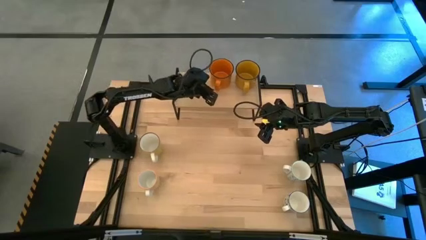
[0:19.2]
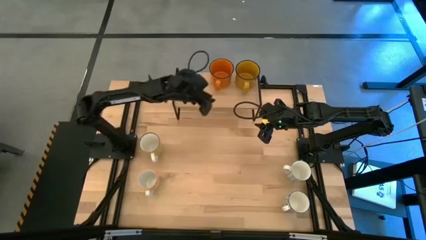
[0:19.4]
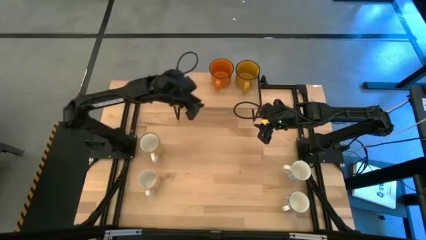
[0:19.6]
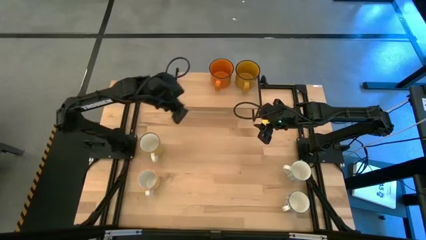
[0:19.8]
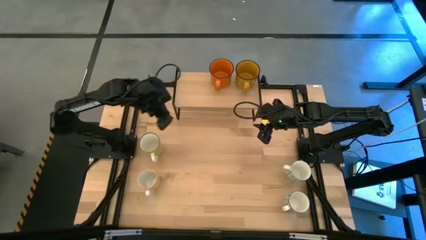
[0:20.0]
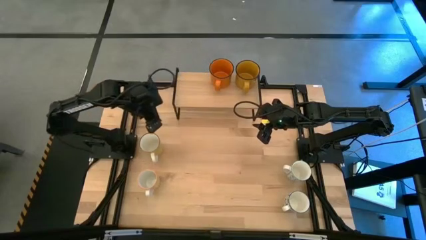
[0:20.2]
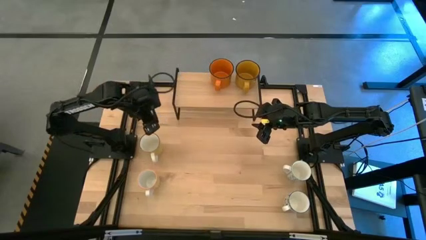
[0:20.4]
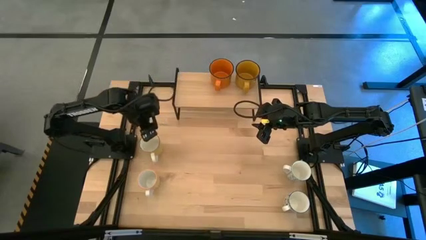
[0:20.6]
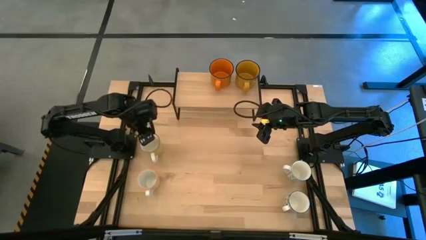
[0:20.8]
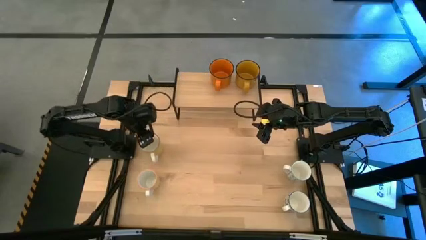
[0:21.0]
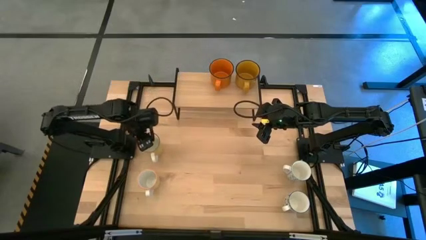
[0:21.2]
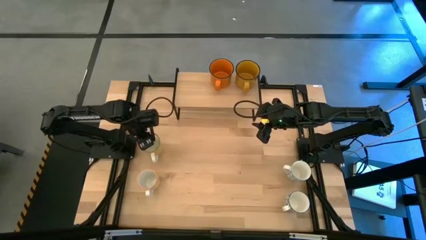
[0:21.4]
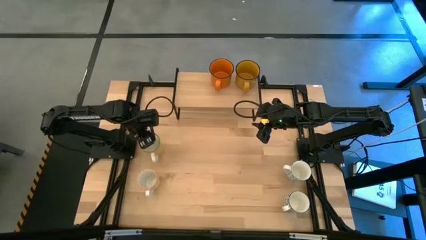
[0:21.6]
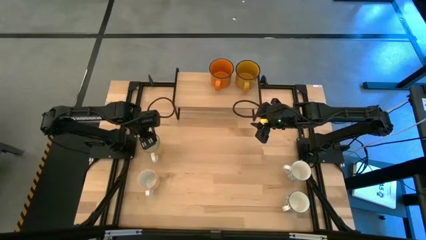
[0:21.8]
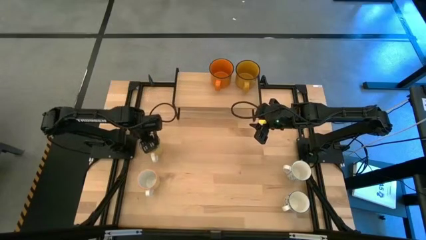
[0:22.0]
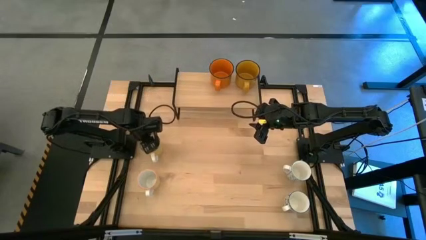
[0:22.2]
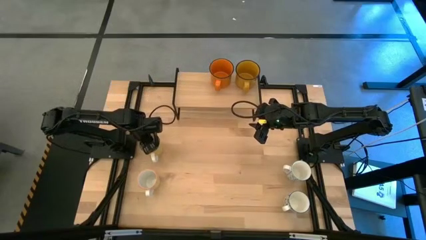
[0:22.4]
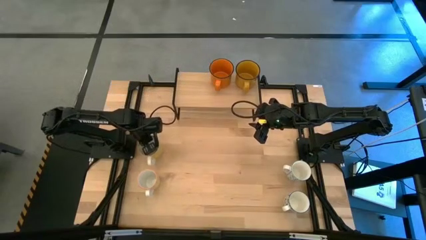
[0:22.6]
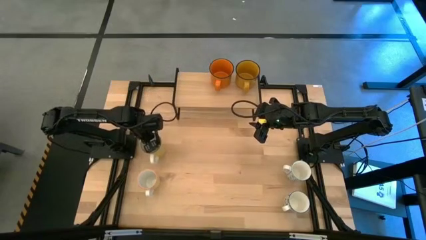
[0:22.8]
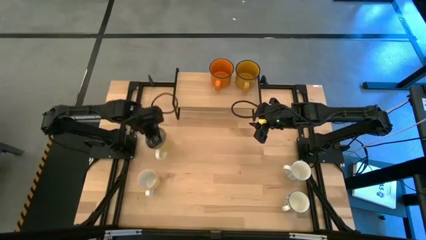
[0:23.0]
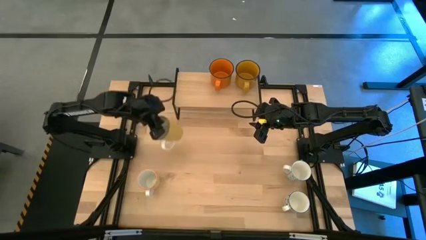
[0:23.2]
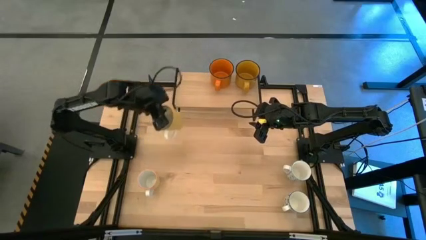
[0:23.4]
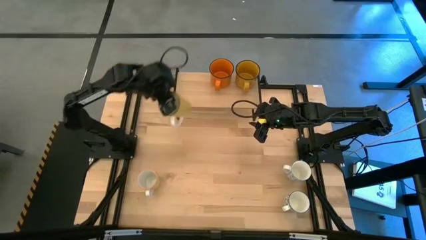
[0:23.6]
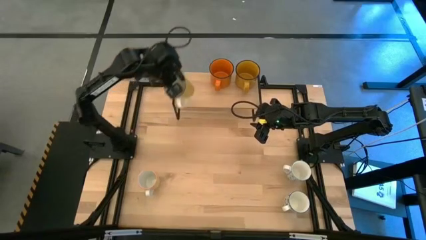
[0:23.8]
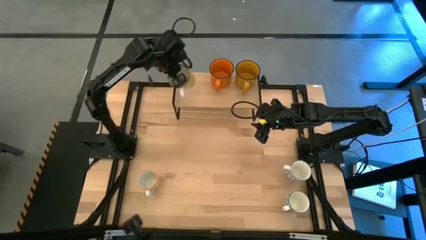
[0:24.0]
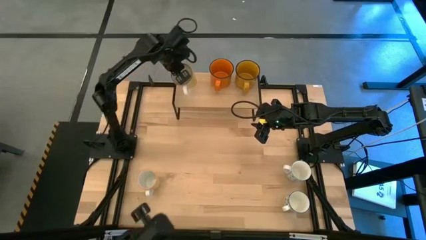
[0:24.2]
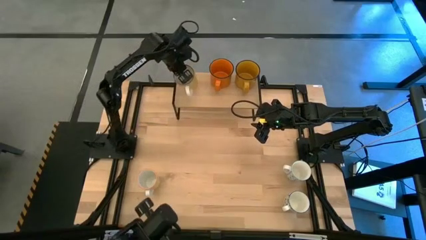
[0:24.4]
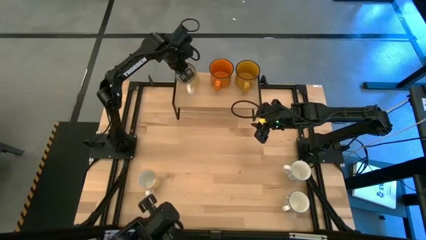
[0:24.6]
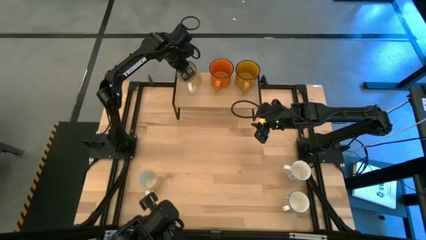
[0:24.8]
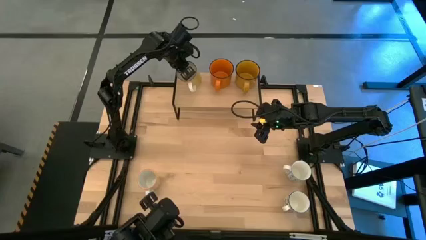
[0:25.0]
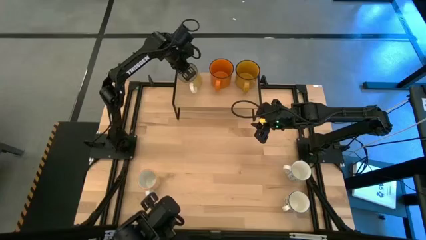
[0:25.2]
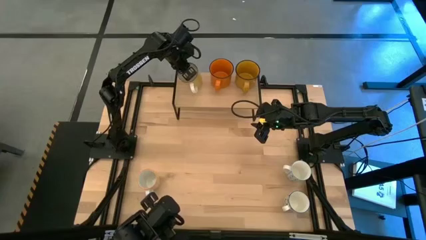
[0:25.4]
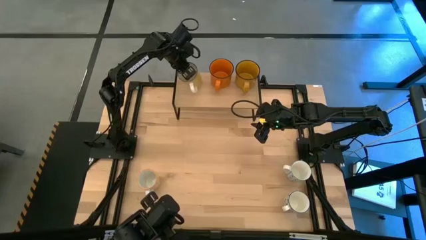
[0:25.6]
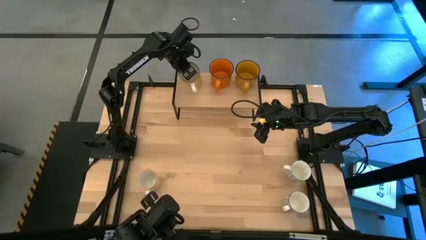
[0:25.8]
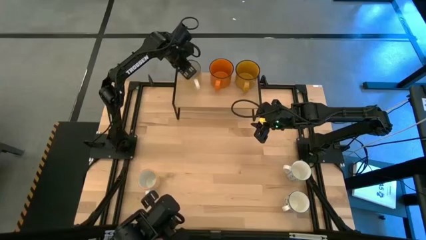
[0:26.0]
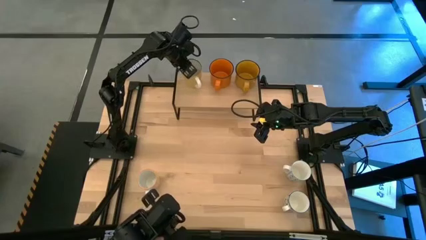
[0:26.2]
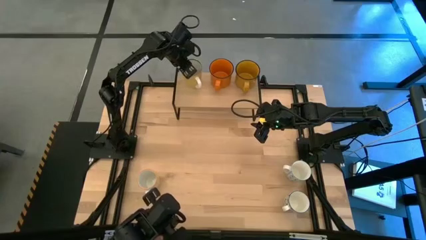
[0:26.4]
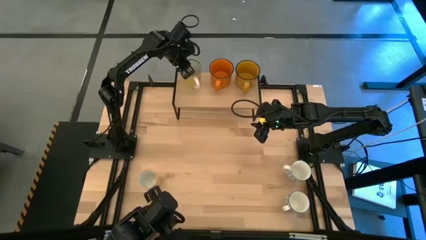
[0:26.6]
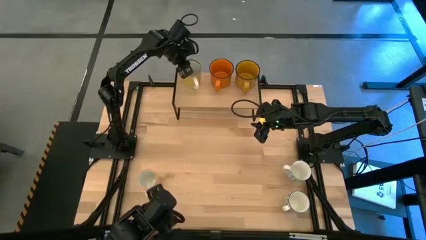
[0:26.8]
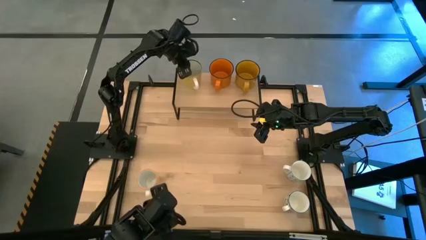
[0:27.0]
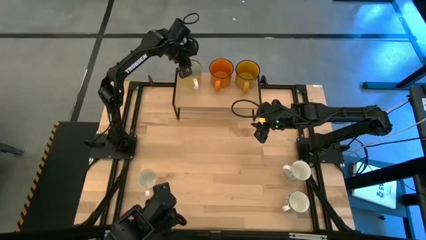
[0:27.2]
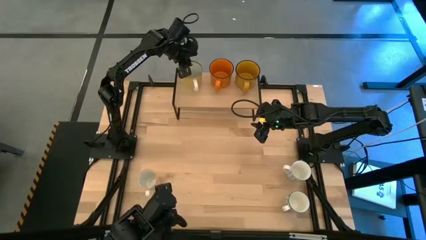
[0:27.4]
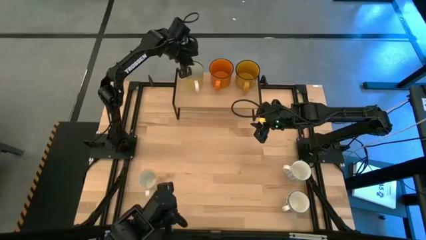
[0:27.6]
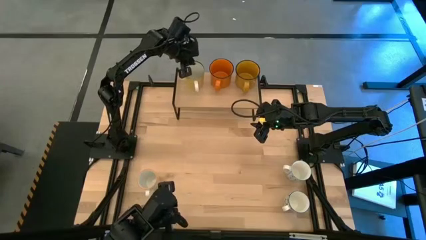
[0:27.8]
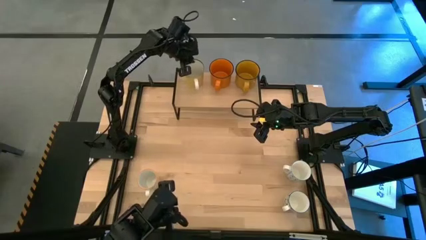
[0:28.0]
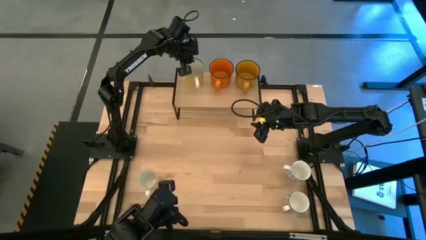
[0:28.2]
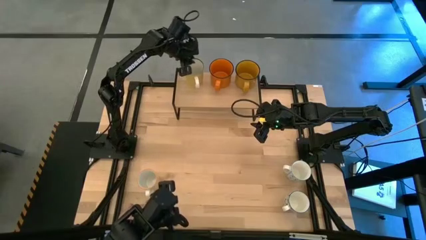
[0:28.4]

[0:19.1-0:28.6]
Task: Place coffee mugs
Put the light yellow mug on the shelf

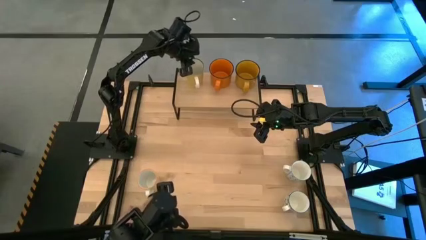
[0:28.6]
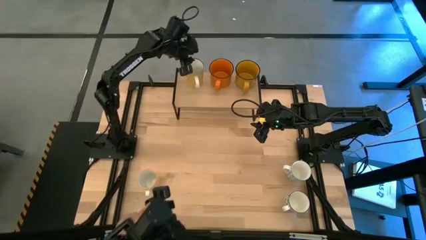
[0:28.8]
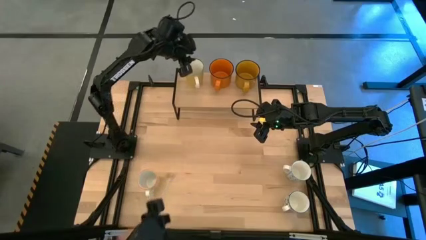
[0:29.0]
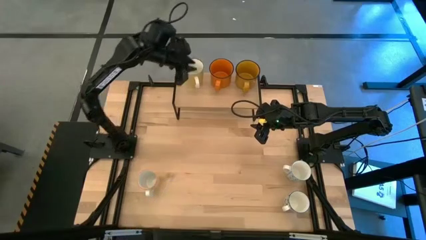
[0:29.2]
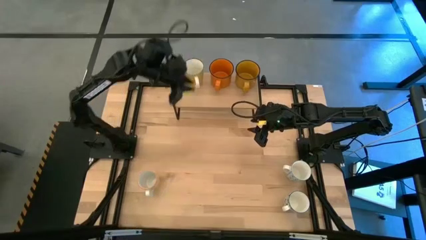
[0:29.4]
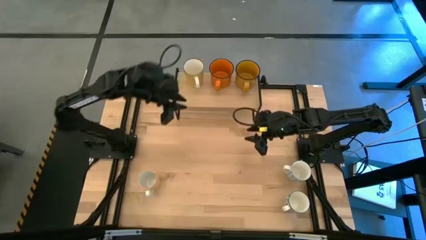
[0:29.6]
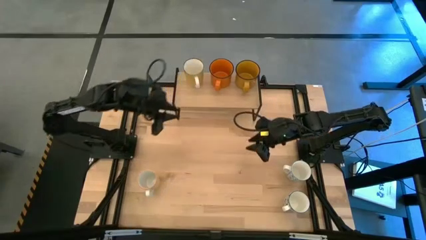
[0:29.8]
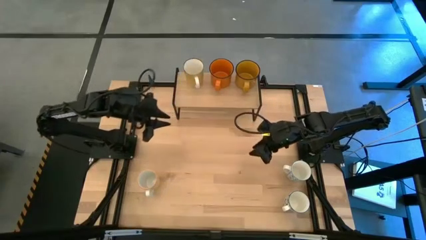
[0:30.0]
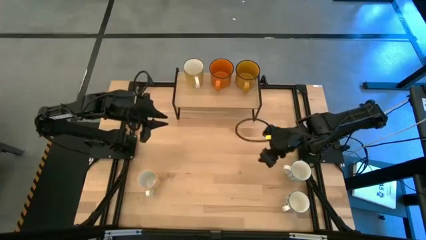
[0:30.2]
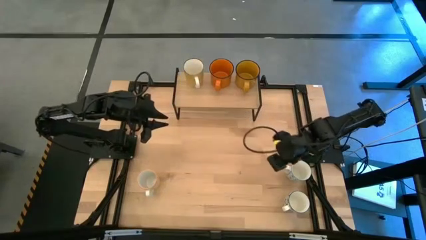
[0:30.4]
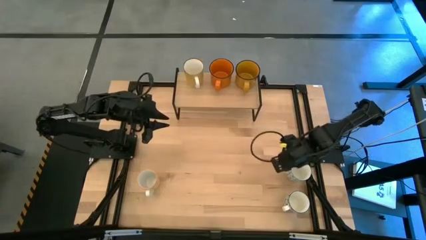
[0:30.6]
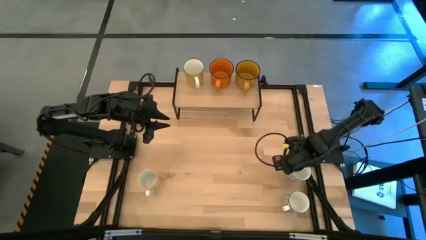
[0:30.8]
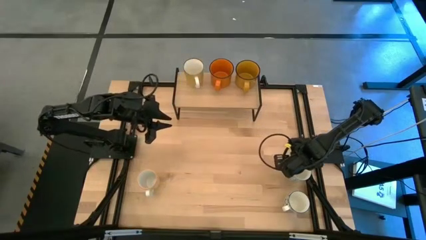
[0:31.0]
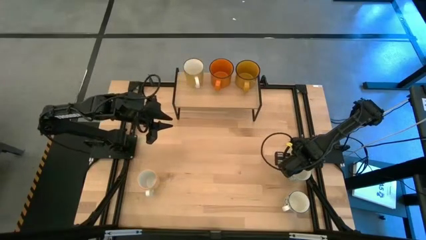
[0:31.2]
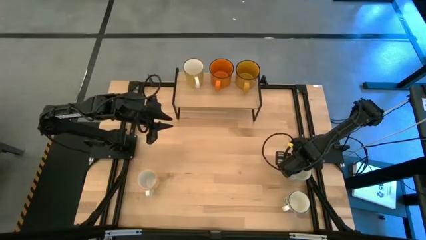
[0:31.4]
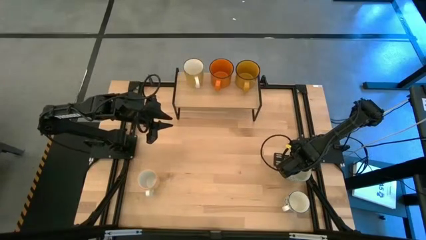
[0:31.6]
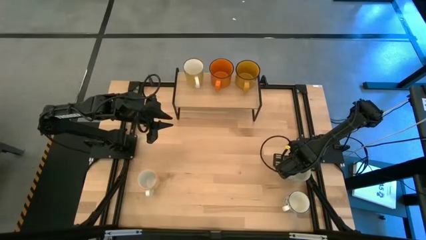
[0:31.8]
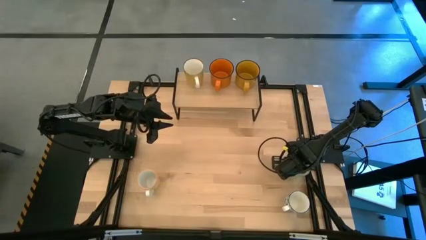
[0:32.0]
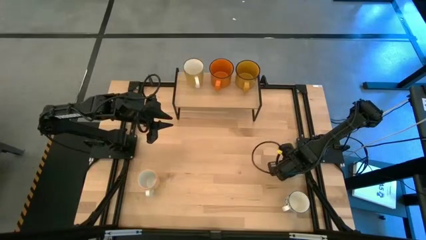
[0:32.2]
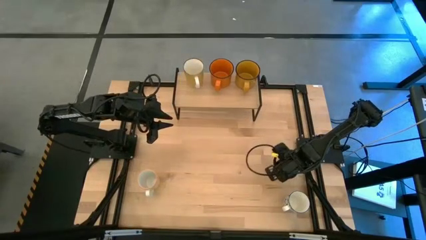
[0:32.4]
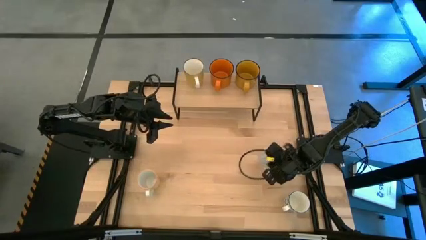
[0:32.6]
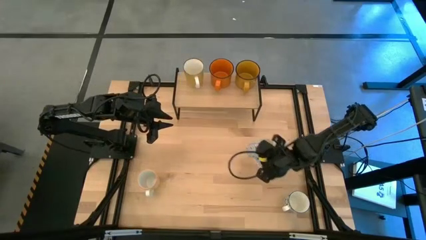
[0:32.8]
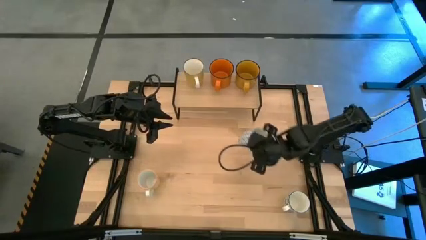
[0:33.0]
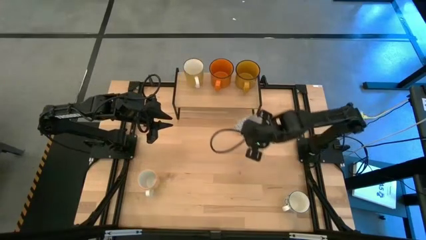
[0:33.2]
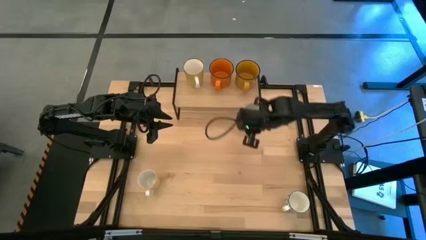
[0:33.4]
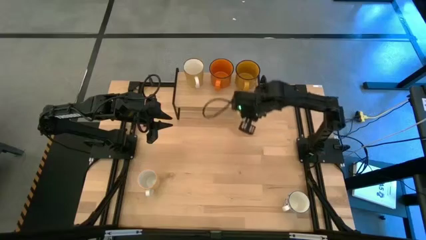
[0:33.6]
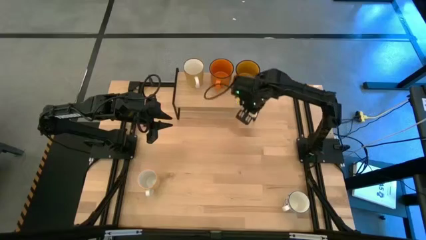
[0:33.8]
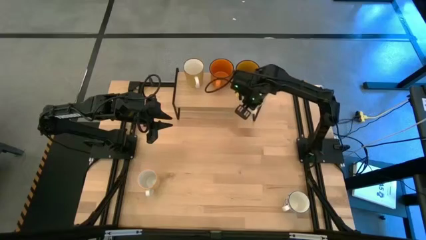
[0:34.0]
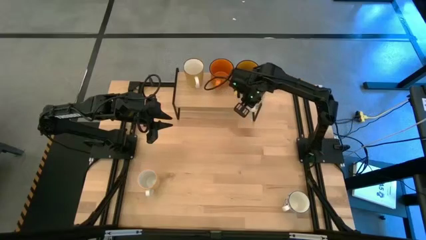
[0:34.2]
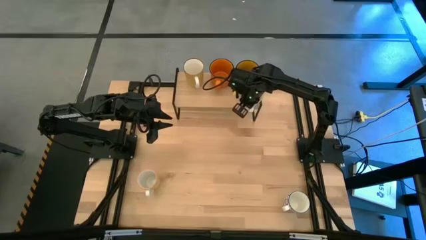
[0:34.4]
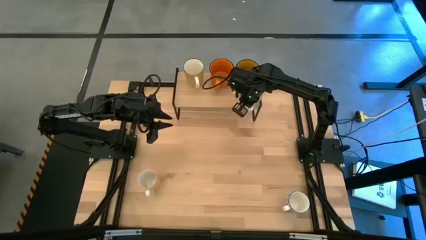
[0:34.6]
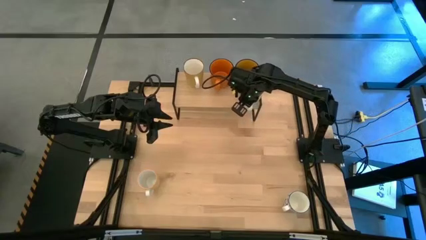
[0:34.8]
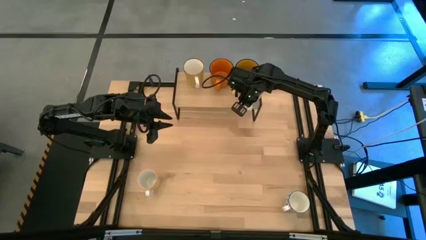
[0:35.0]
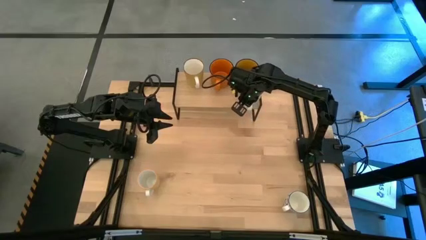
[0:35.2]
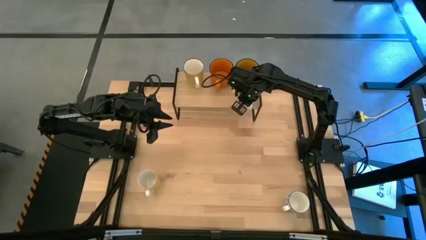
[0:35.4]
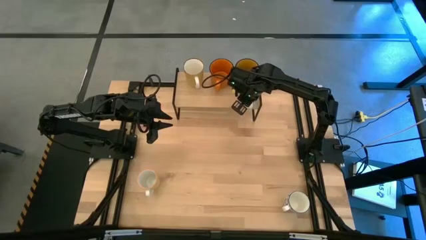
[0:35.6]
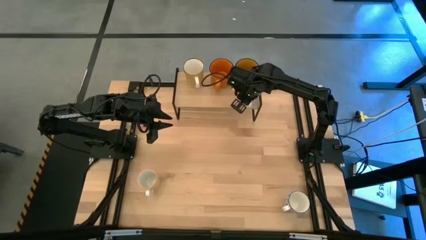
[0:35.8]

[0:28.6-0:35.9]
Put the top blue patterned mug on the shelf
